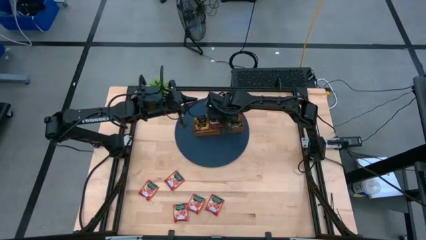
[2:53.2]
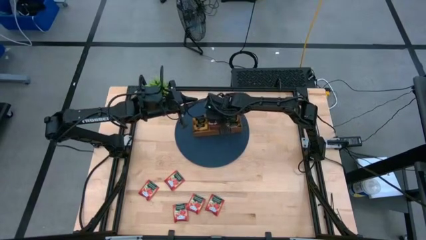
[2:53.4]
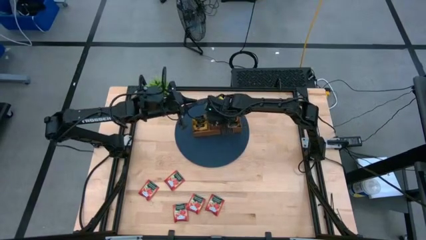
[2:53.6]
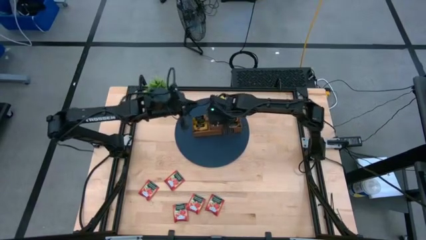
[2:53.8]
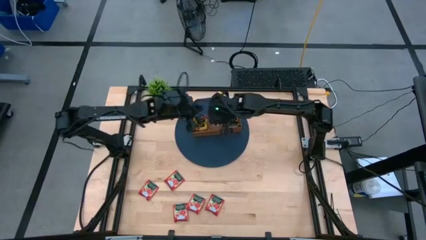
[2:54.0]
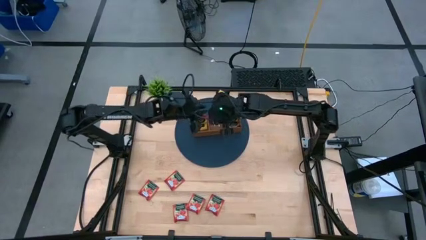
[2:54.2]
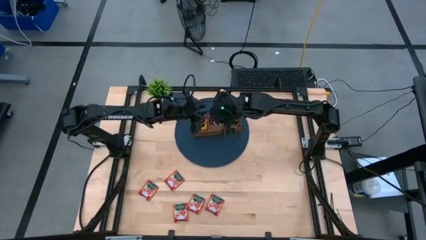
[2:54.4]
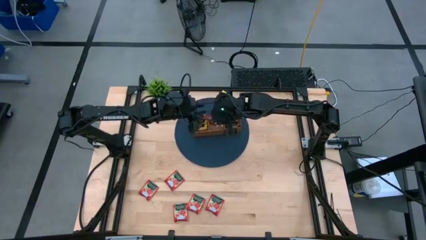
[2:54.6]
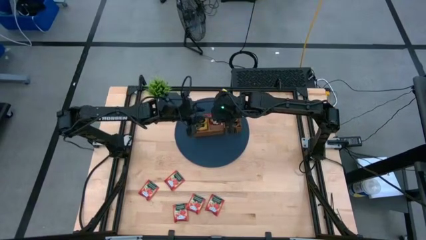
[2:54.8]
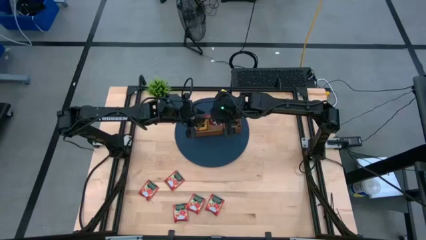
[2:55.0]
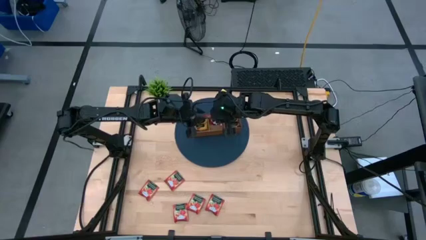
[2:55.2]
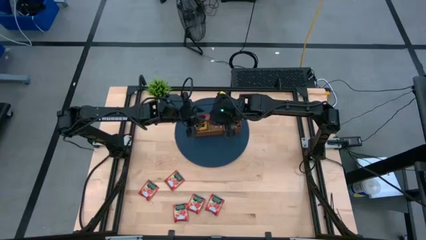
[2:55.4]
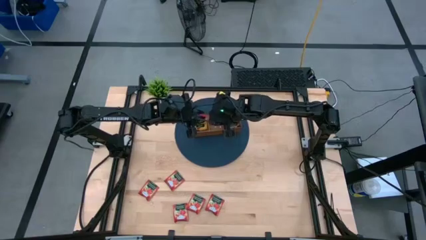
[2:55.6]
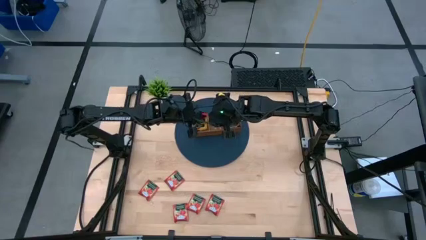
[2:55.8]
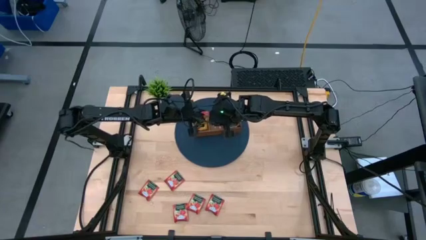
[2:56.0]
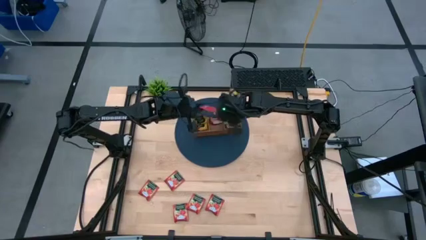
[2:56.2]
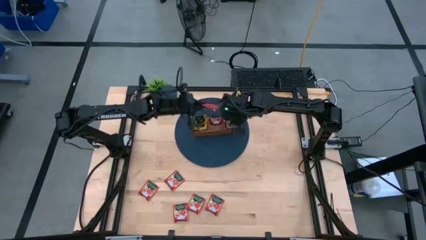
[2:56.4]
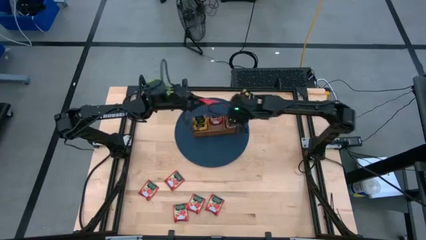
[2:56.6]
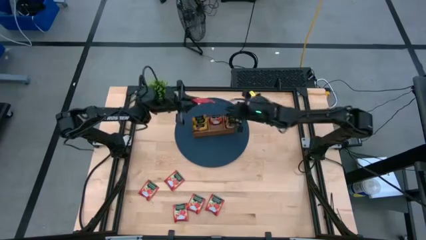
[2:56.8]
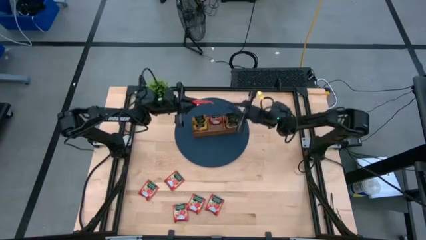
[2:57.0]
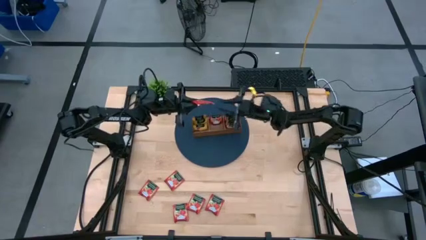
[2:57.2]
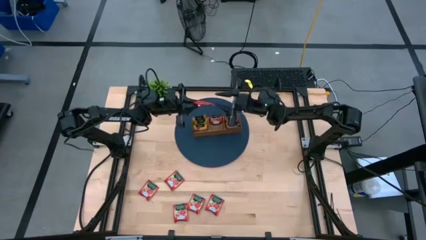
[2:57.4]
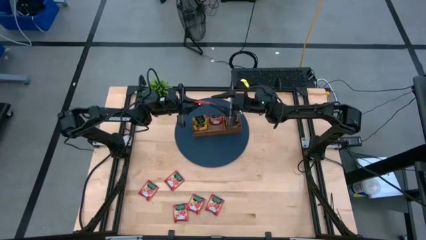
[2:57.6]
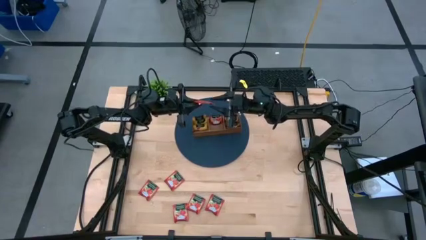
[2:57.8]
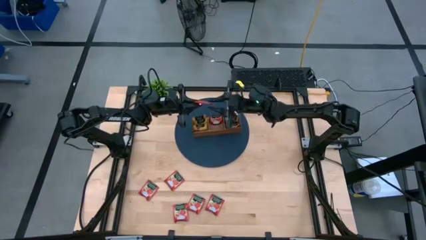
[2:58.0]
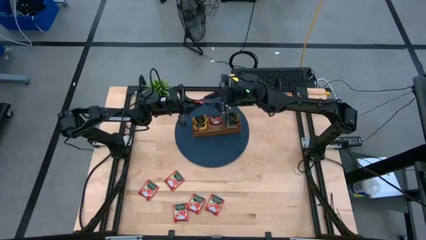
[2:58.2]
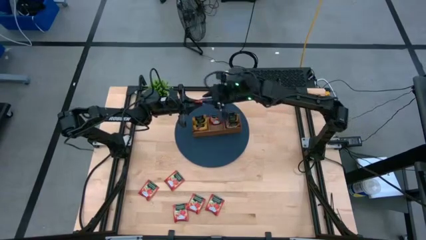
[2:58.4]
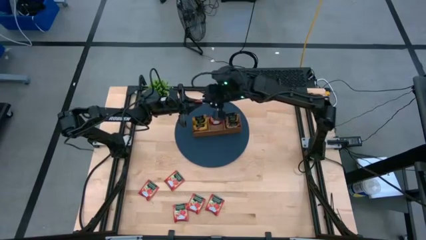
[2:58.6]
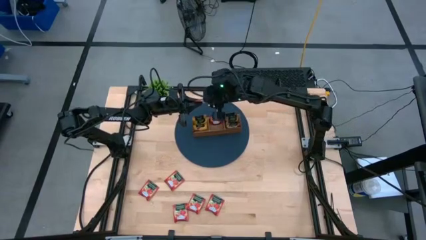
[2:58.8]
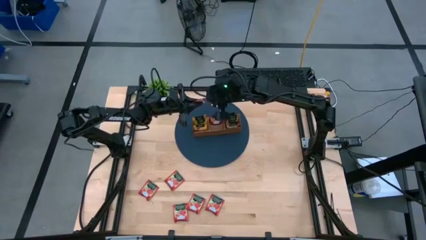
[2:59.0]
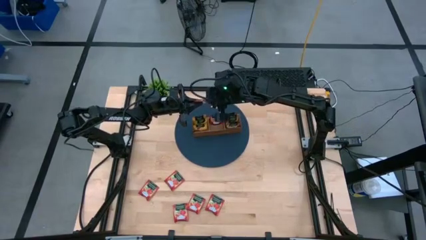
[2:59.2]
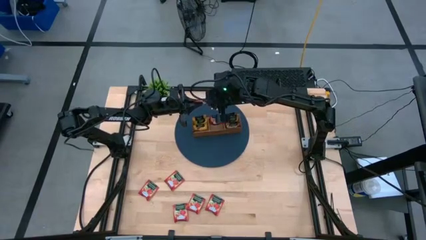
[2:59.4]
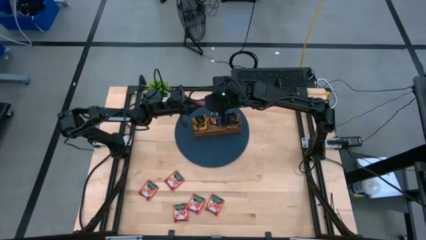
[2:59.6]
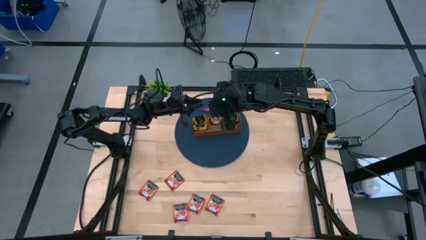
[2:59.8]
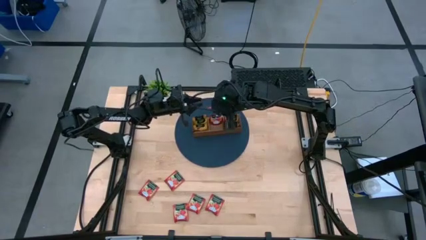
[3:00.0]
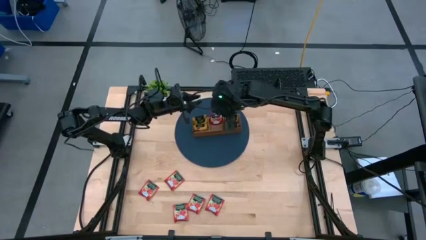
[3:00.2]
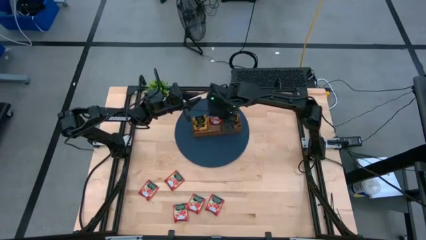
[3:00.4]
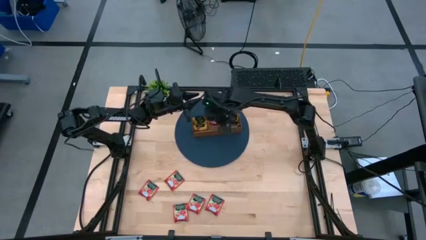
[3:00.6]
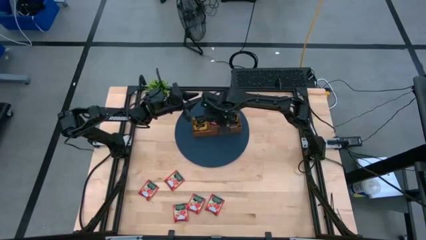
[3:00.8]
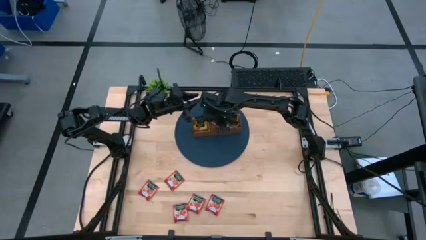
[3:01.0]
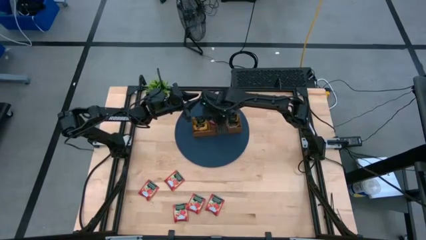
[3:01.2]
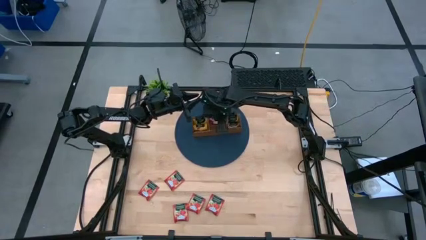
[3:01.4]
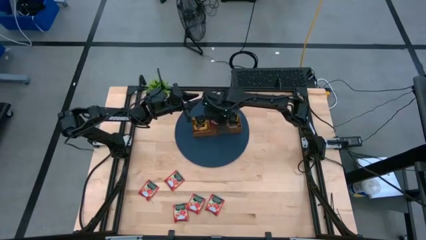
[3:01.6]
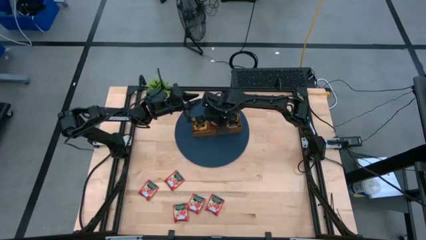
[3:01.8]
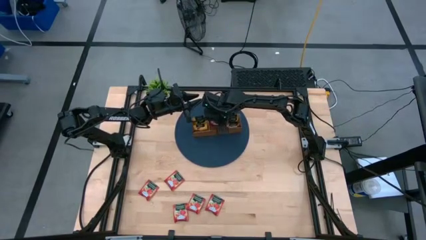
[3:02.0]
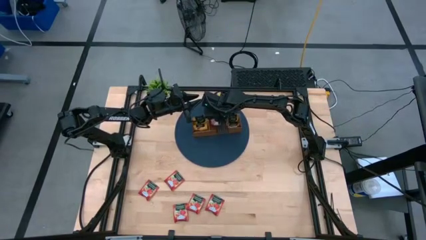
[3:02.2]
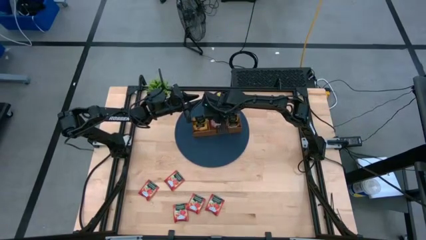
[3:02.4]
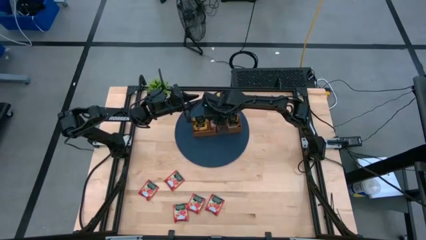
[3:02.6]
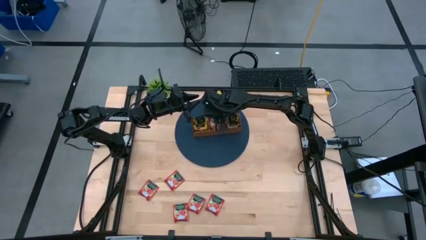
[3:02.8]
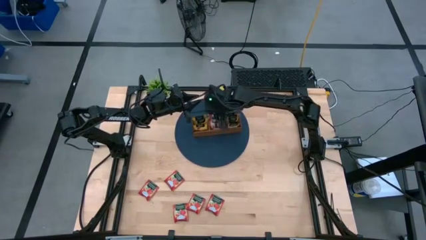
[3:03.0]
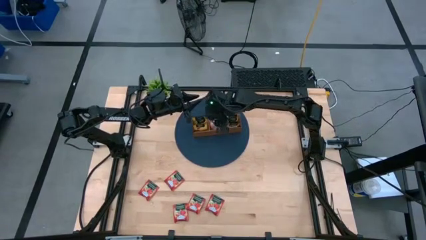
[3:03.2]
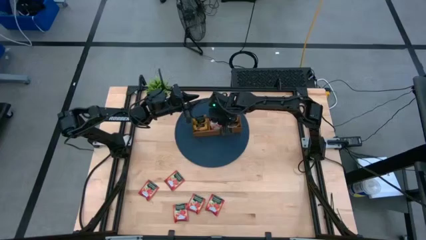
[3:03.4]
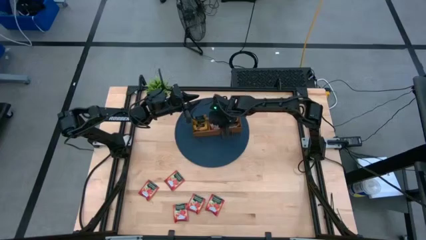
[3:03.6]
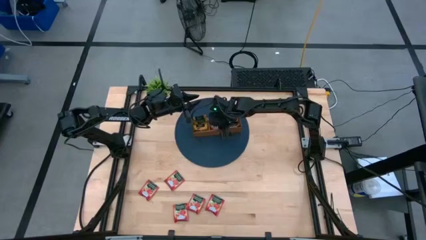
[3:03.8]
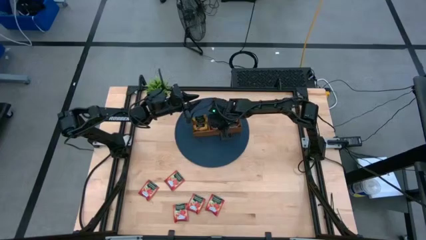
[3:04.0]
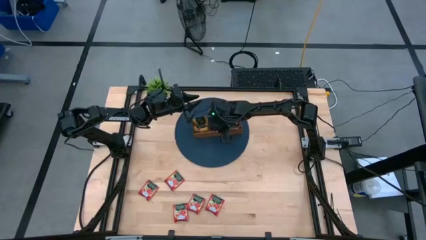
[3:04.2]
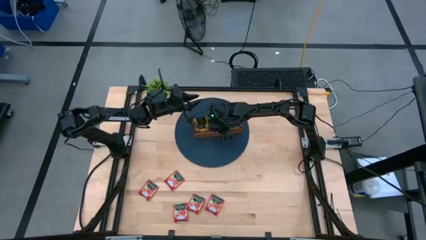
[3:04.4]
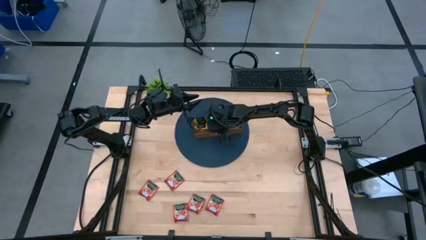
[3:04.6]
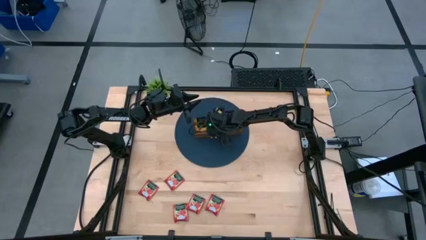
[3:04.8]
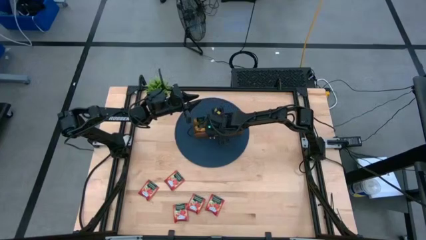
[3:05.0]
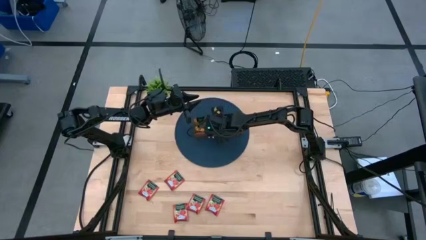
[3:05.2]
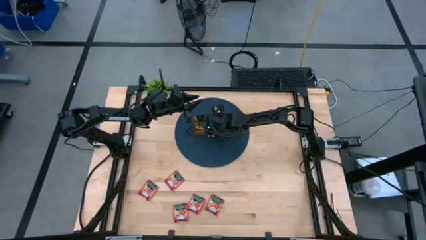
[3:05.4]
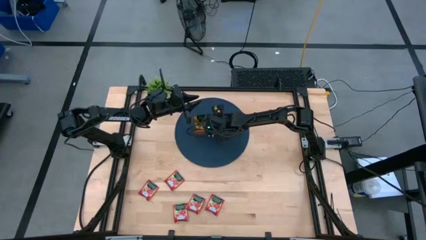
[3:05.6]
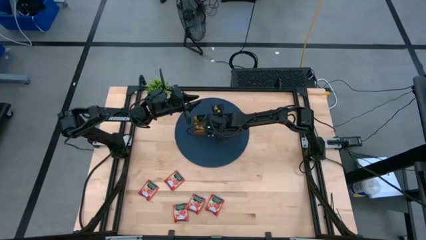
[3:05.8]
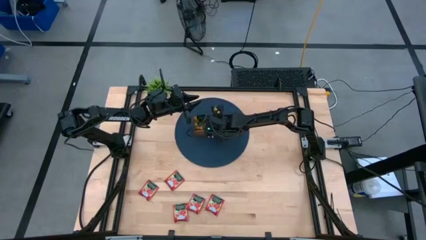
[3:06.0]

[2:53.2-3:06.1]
Task: Pick & Place Tea
Put the red tea bag into the middle section of the wooden organizer
